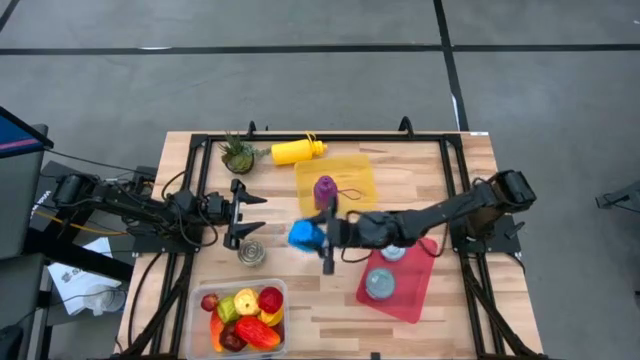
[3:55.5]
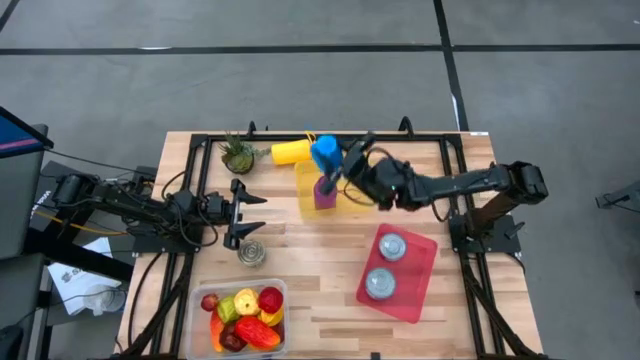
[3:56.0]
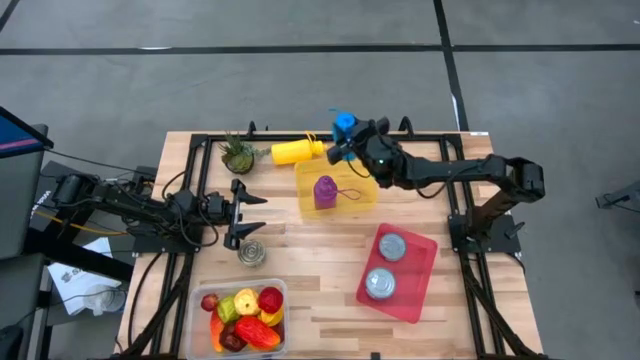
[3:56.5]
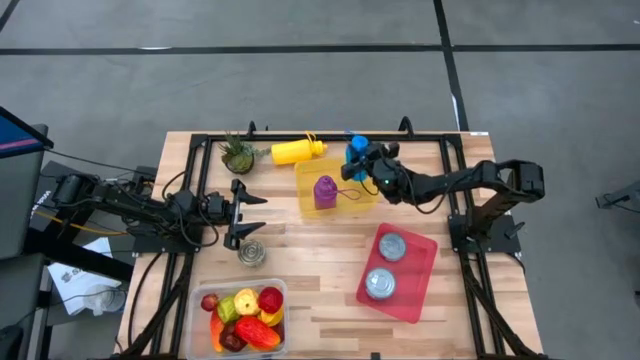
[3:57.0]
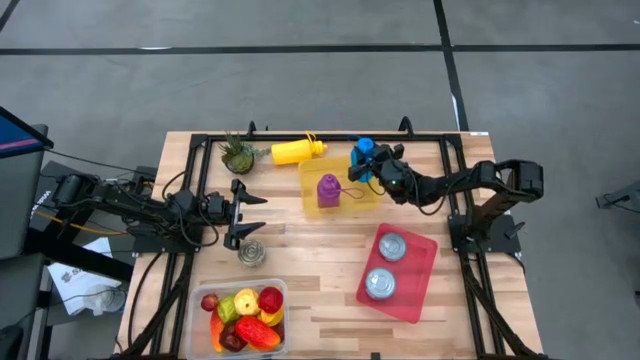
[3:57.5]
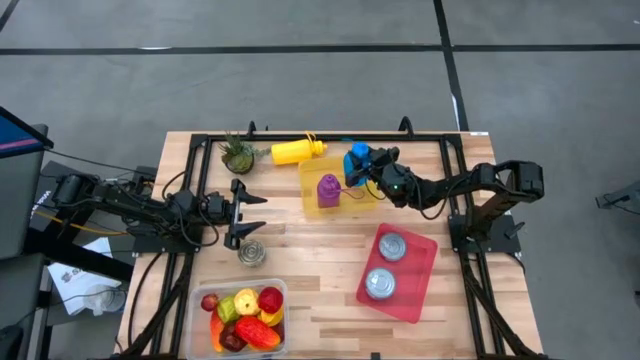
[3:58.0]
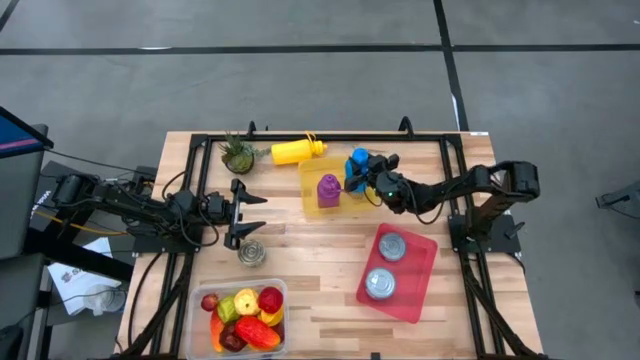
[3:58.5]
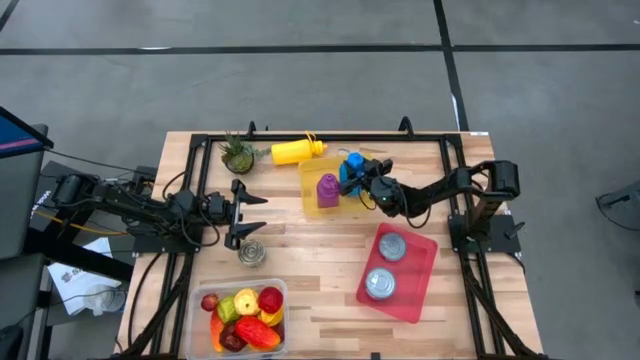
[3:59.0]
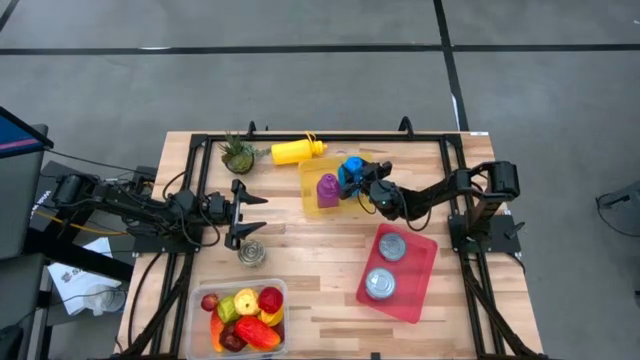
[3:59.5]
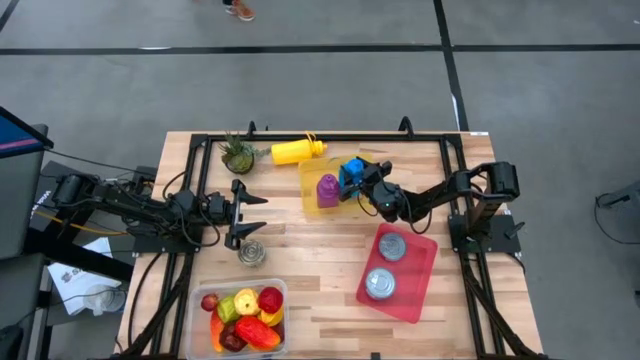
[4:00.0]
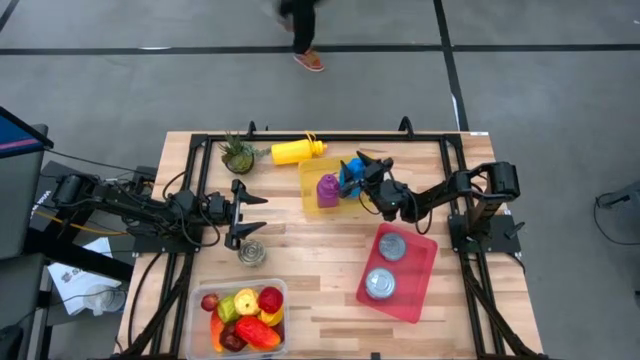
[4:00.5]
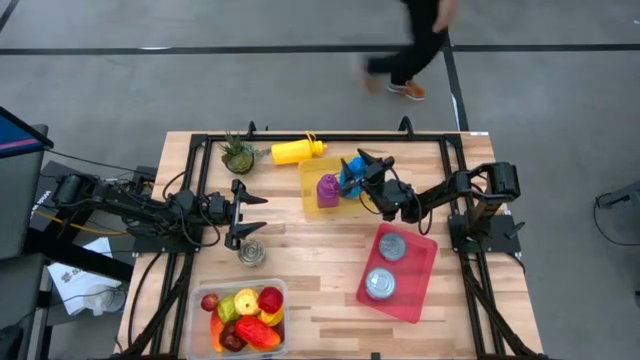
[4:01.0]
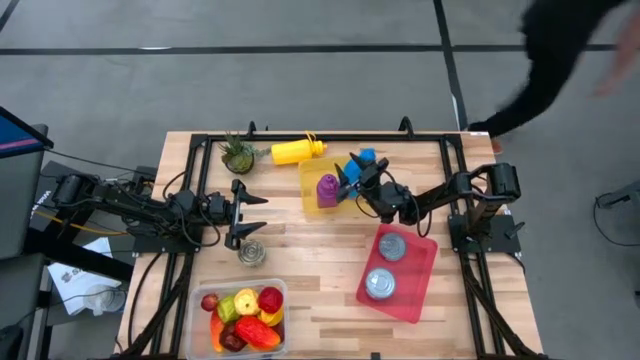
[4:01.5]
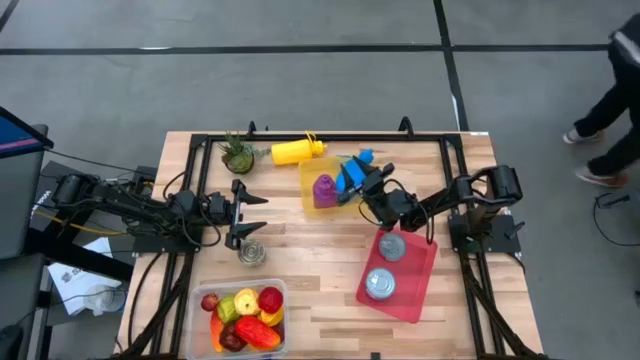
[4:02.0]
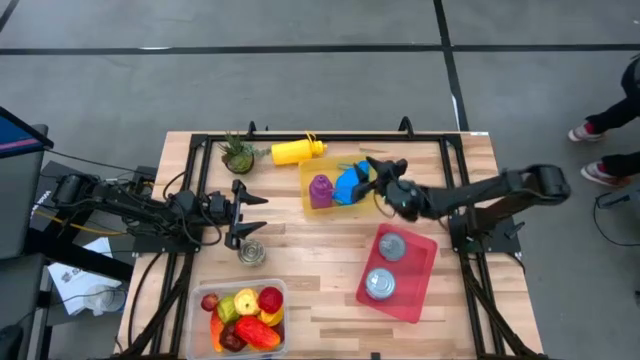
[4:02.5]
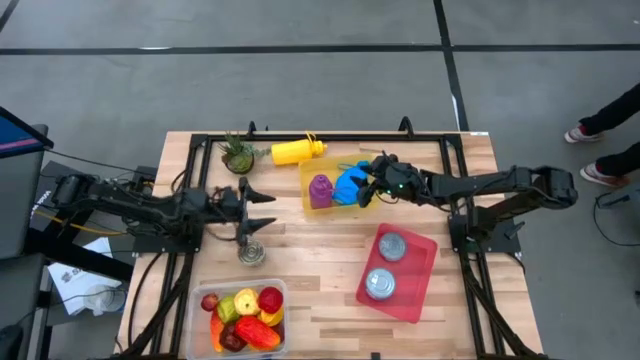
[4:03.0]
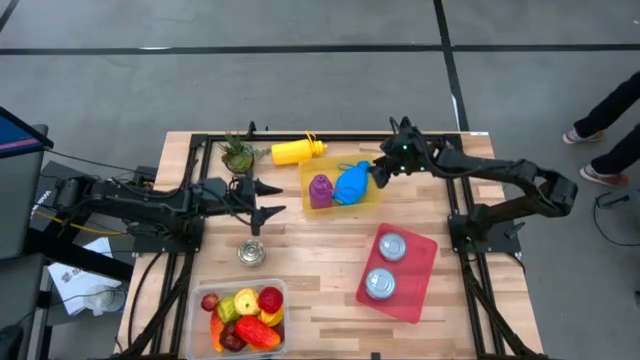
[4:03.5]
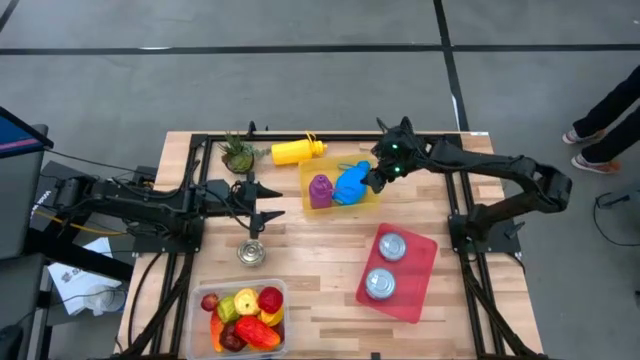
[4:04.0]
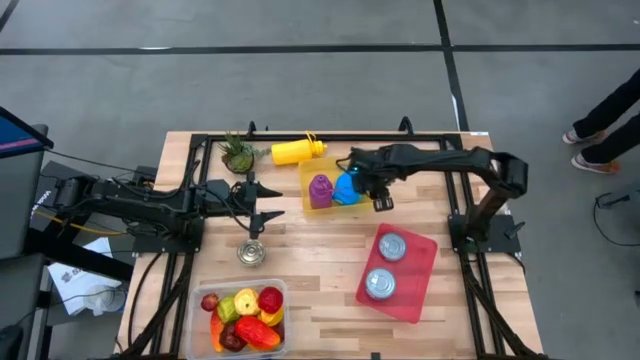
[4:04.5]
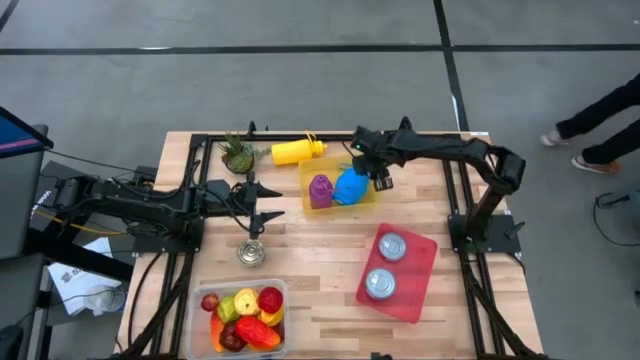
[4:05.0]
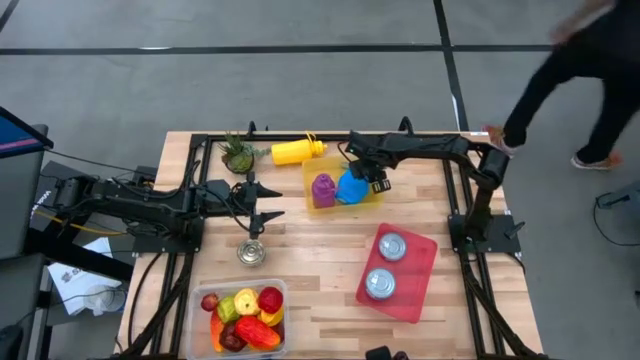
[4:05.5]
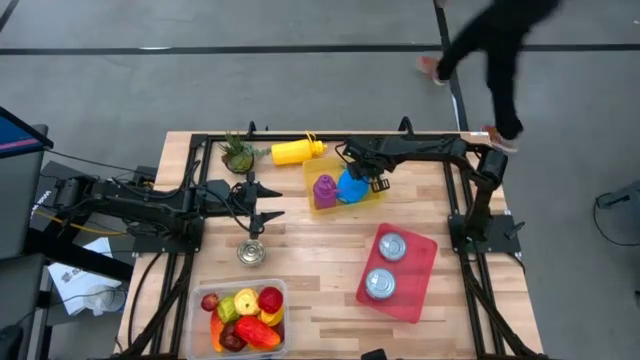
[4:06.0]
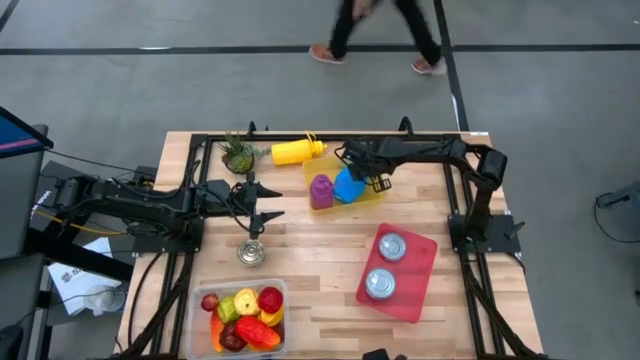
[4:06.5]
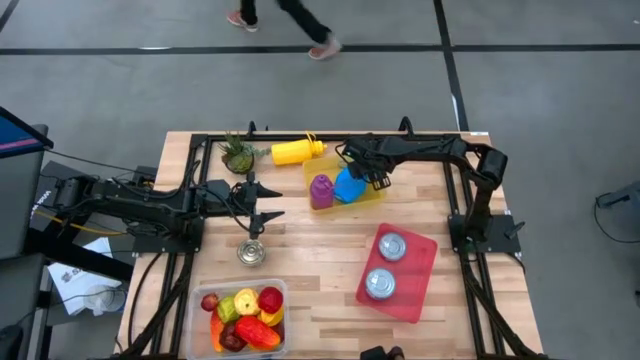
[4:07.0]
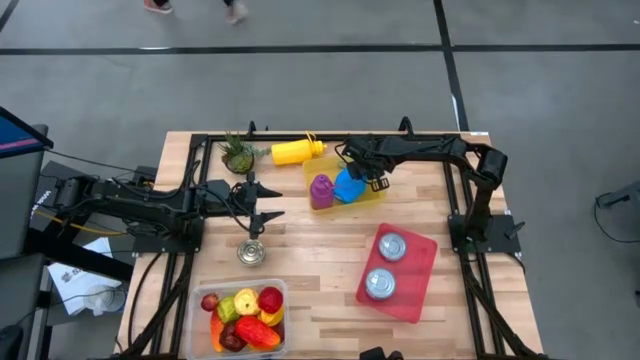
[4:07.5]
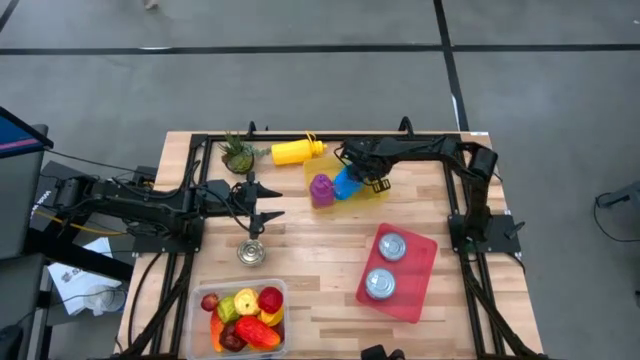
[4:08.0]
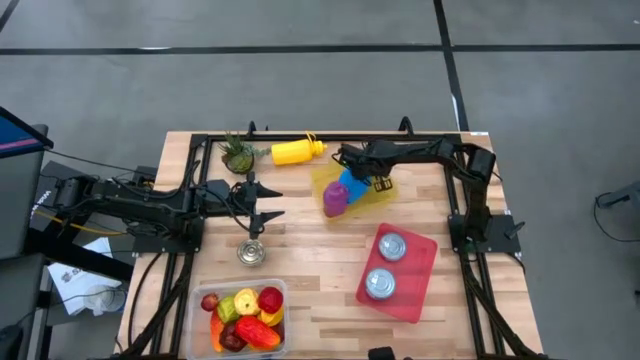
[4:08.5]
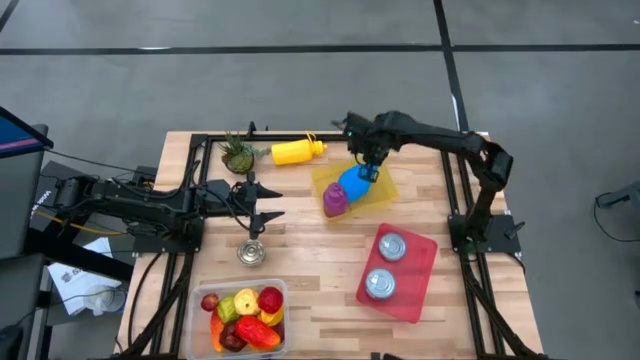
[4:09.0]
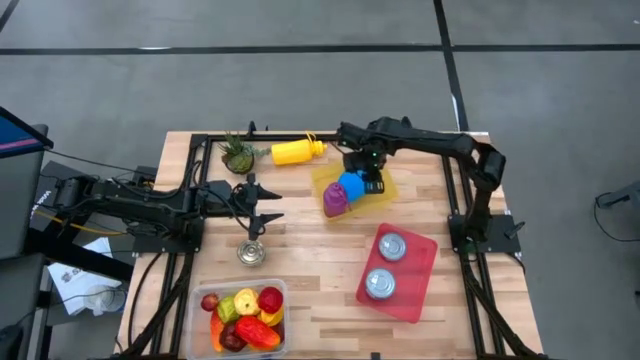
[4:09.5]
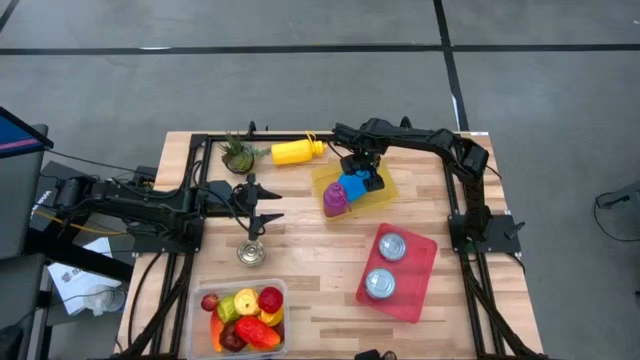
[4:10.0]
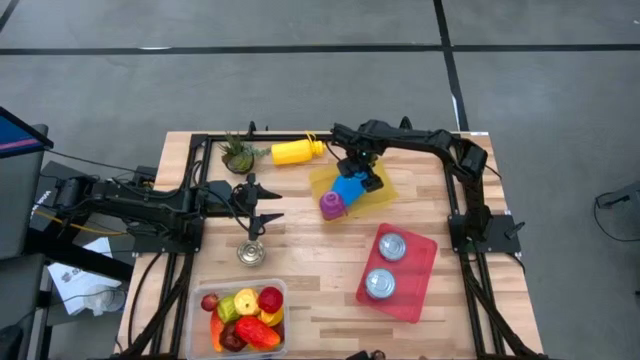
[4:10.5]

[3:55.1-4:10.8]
Task: Pick & Place Food Item
Adjust the blue tumbler in the yellow bin

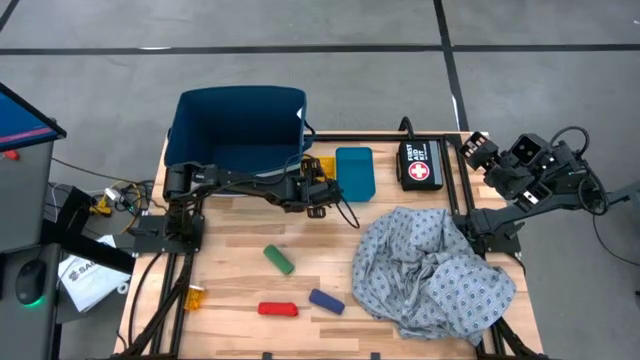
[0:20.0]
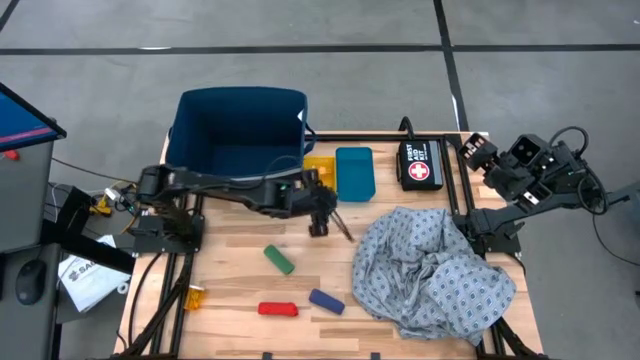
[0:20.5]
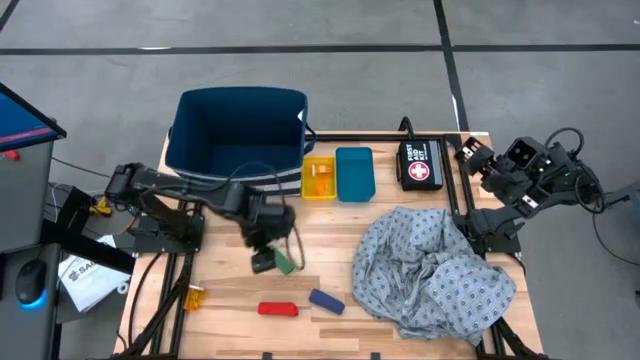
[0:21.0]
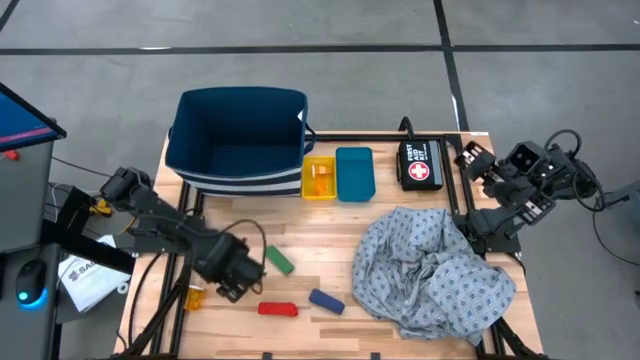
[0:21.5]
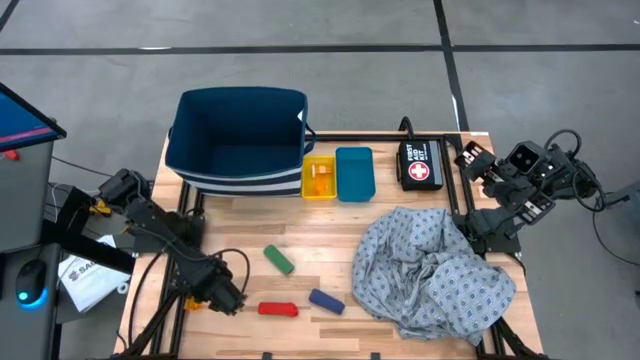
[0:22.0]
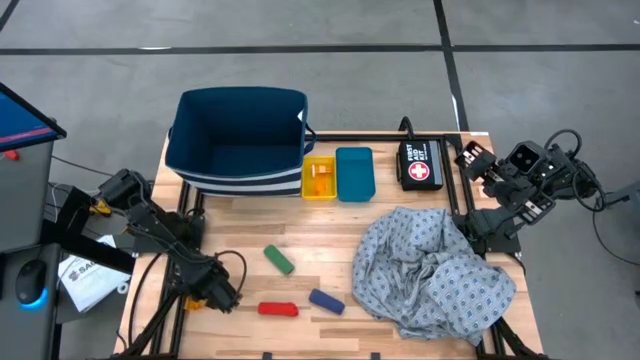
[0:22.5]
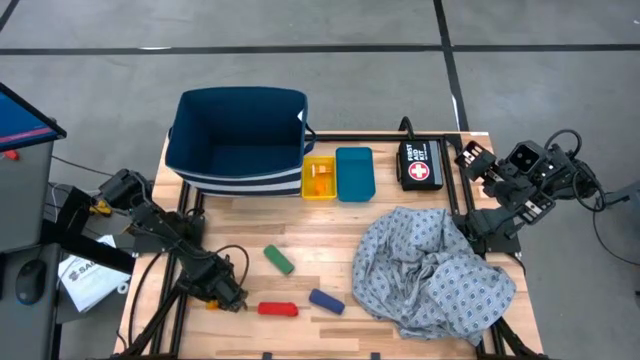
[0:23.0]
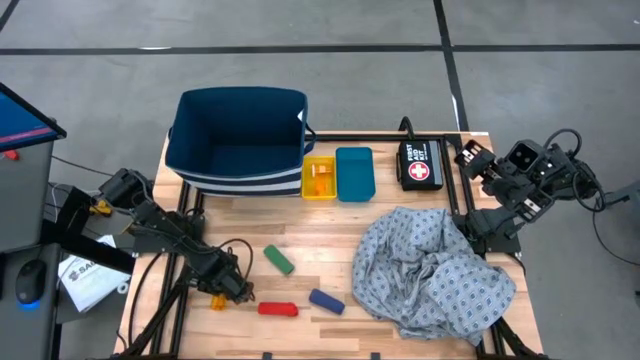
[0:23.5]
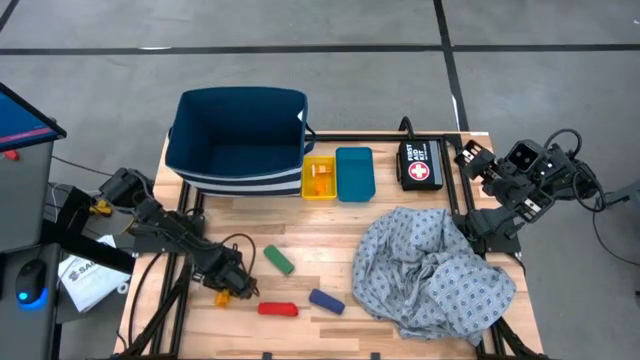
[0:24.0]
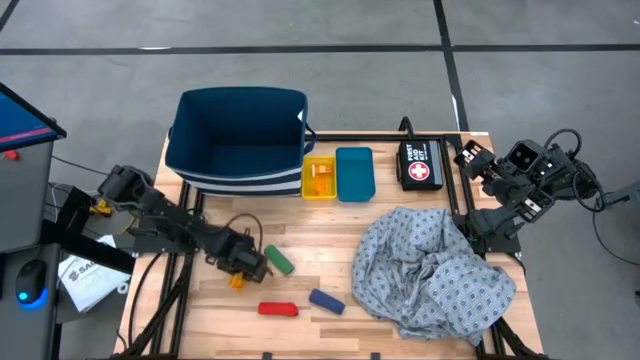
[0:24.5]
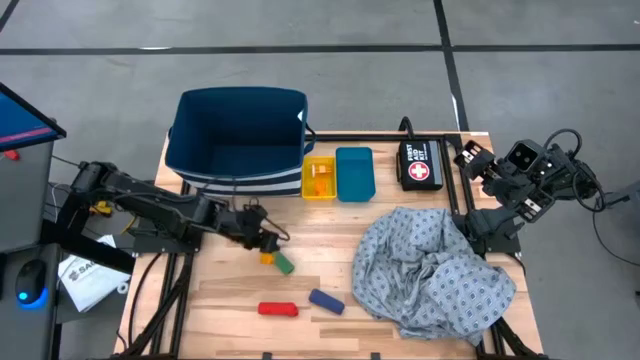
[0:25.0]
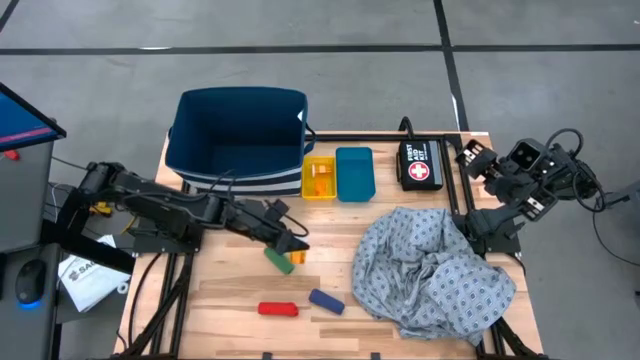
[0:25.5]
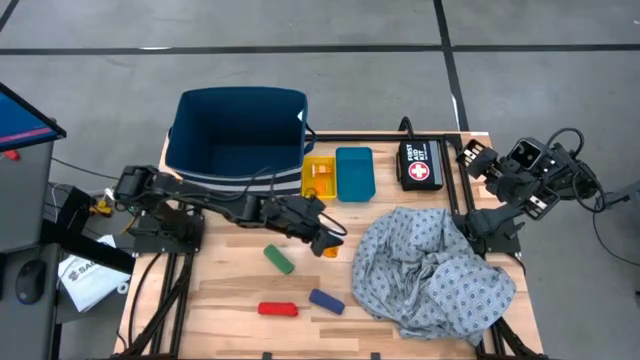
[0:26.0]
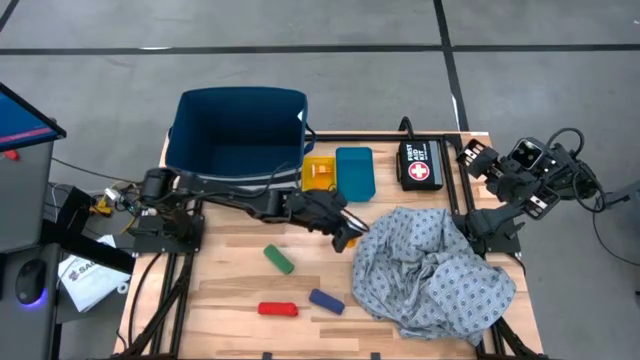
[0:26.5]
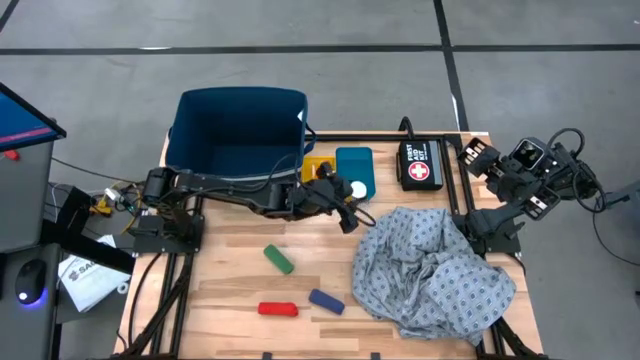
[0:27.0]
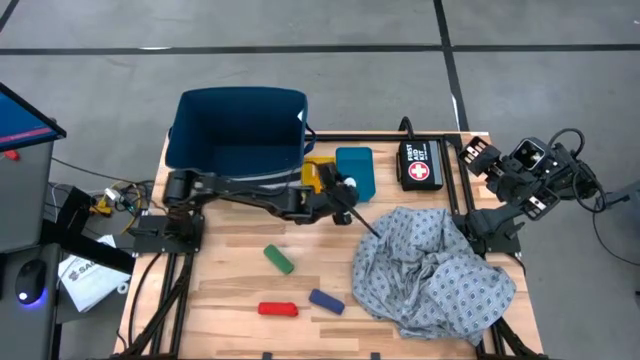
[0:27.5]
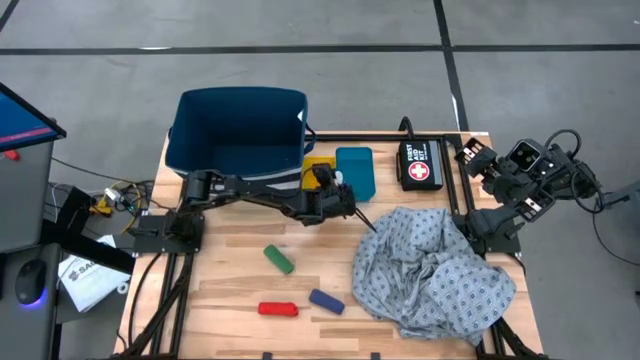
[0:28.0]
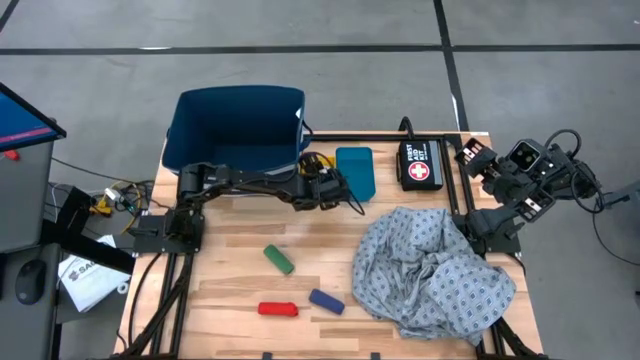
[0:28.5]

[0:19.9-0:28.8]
Task: Pick & place medical supplies in basket/bin
Put the orange pill bottle into the yellow basket
